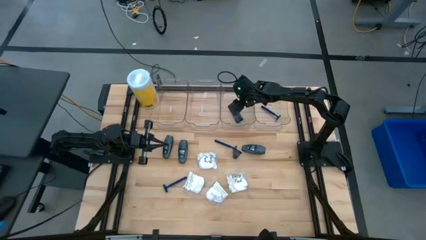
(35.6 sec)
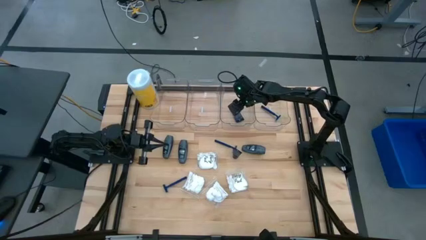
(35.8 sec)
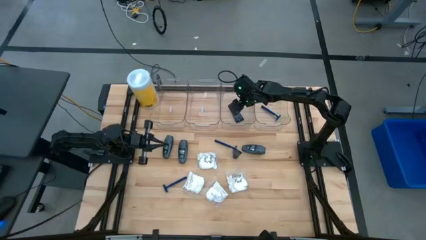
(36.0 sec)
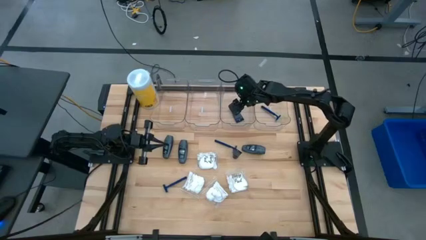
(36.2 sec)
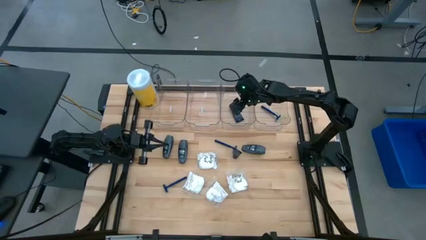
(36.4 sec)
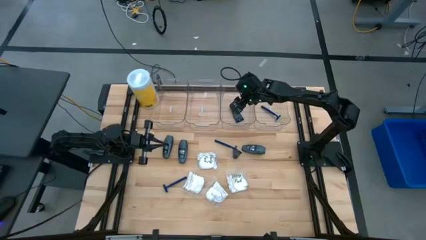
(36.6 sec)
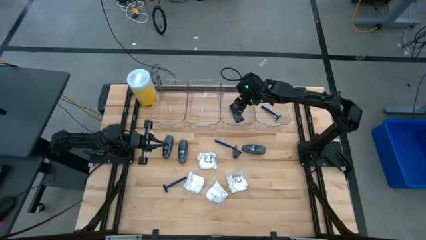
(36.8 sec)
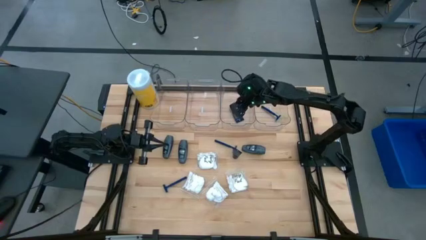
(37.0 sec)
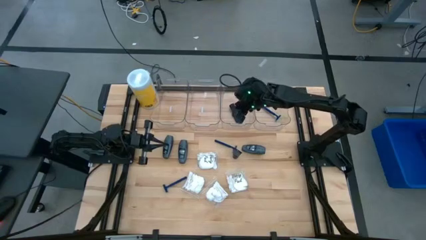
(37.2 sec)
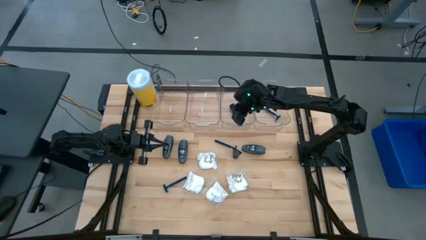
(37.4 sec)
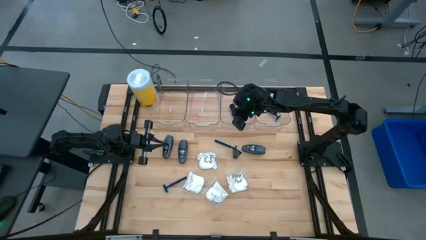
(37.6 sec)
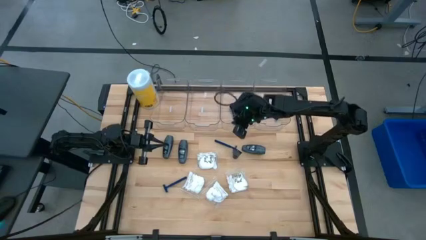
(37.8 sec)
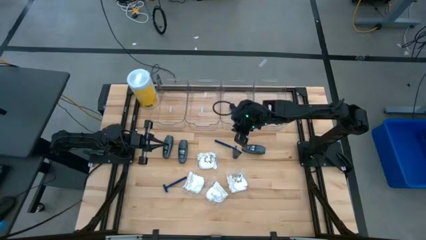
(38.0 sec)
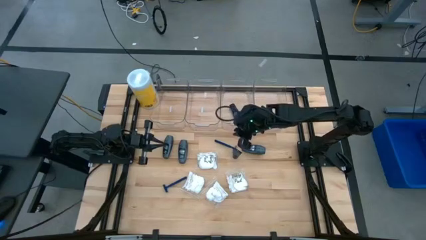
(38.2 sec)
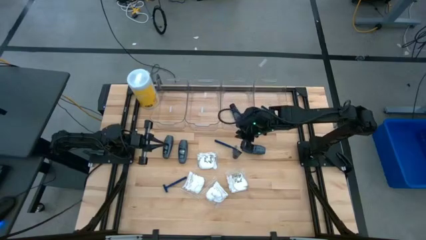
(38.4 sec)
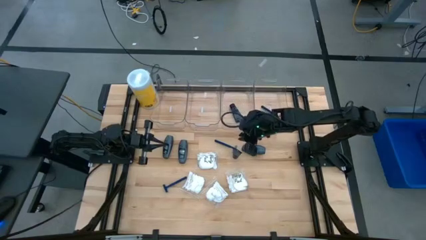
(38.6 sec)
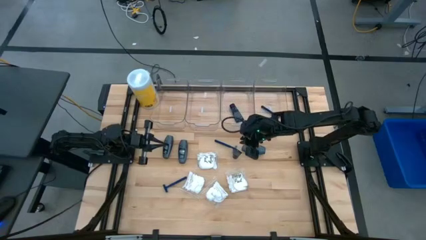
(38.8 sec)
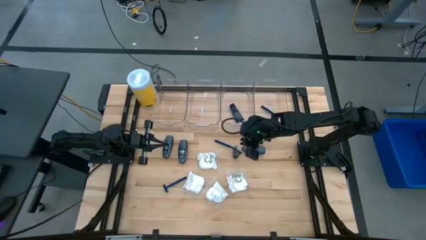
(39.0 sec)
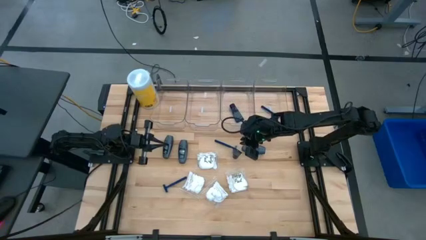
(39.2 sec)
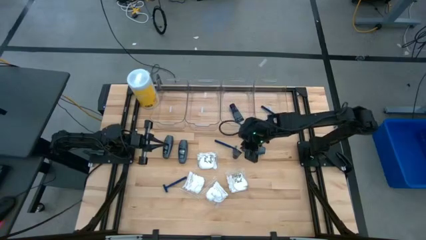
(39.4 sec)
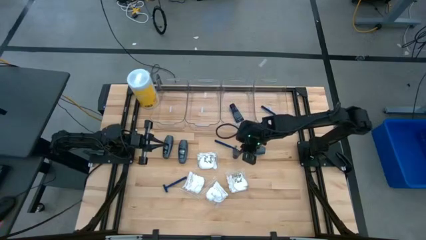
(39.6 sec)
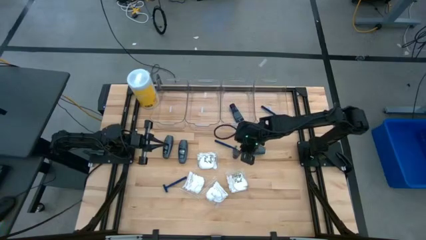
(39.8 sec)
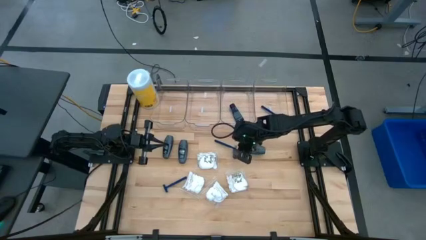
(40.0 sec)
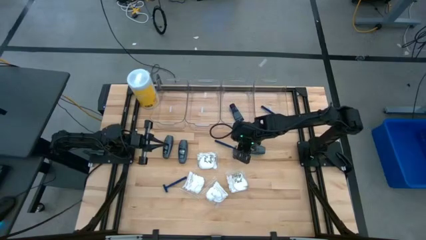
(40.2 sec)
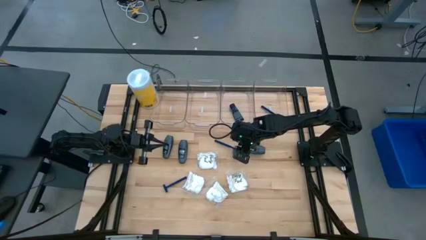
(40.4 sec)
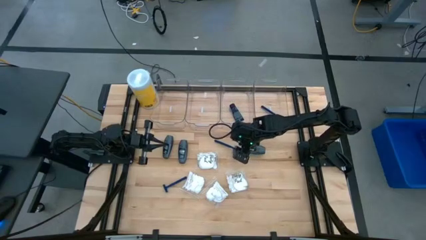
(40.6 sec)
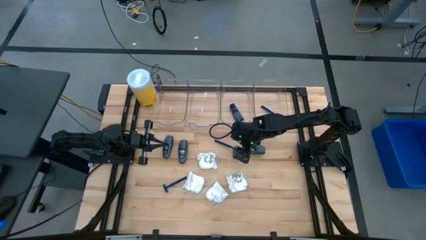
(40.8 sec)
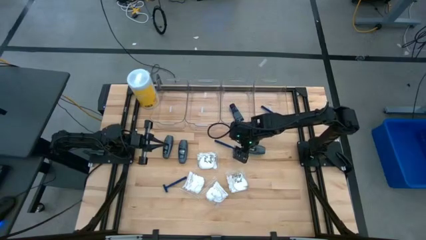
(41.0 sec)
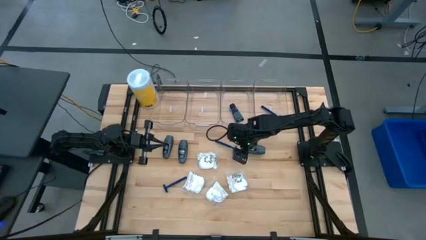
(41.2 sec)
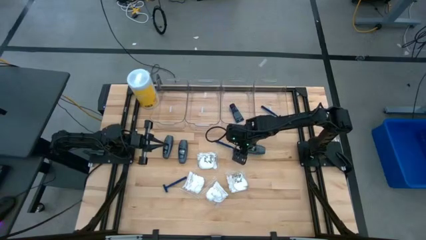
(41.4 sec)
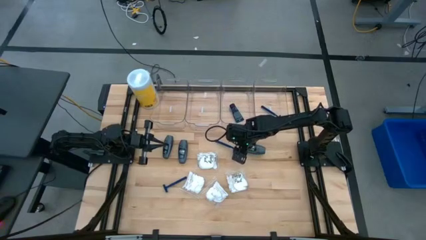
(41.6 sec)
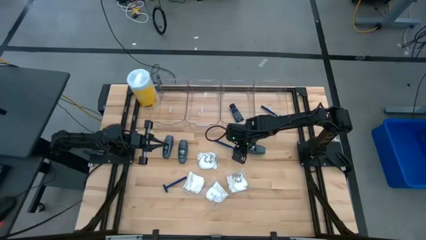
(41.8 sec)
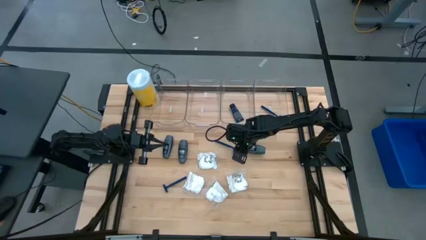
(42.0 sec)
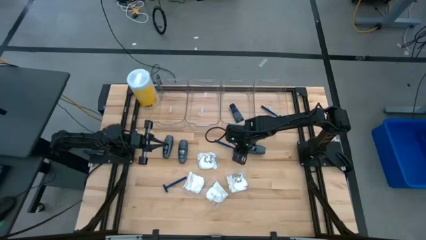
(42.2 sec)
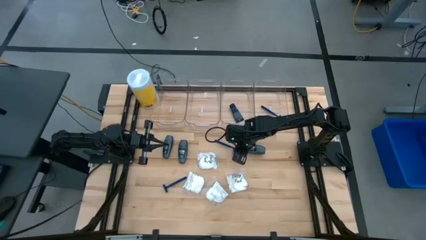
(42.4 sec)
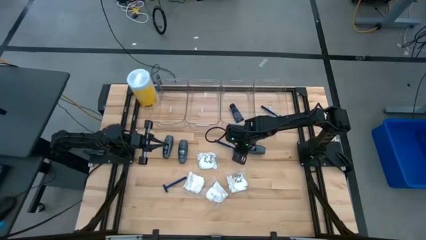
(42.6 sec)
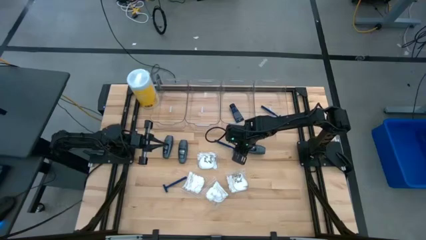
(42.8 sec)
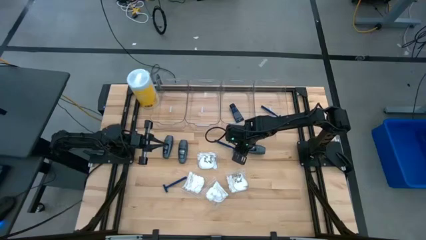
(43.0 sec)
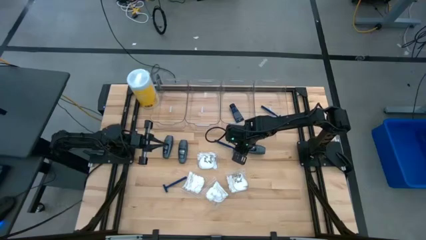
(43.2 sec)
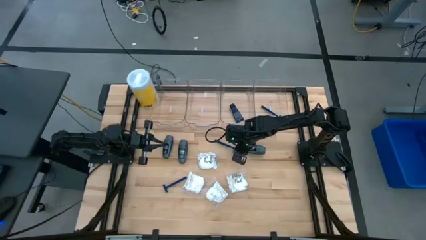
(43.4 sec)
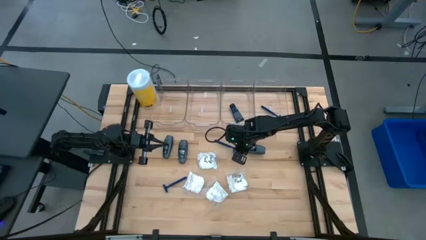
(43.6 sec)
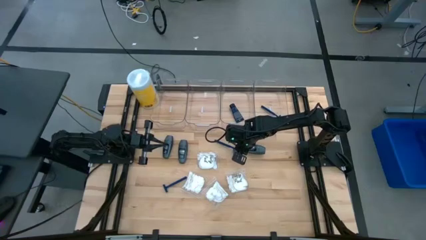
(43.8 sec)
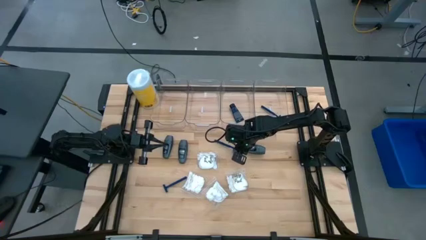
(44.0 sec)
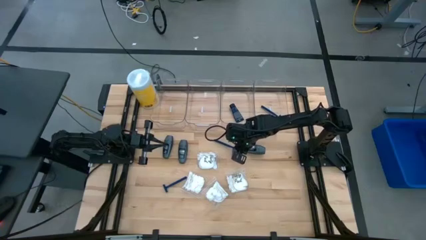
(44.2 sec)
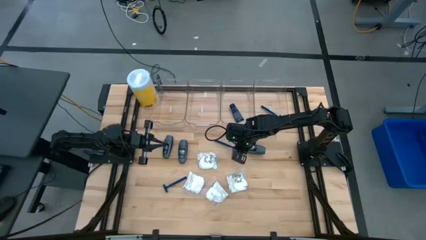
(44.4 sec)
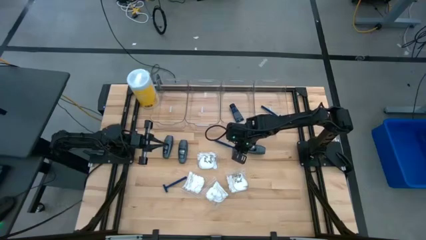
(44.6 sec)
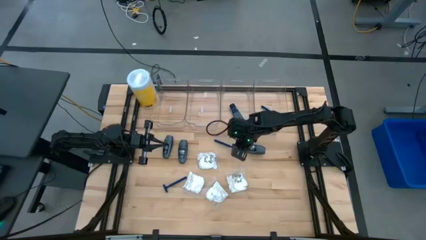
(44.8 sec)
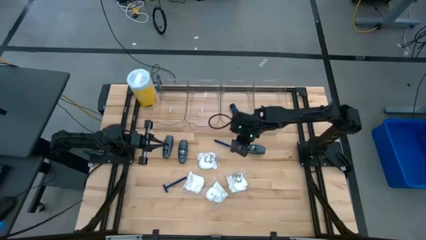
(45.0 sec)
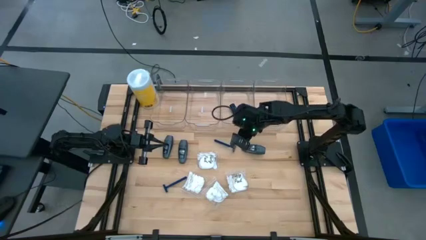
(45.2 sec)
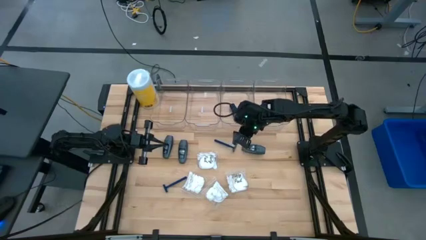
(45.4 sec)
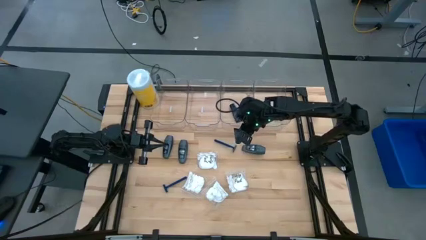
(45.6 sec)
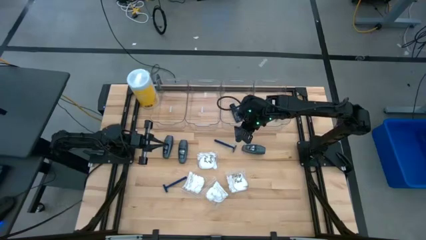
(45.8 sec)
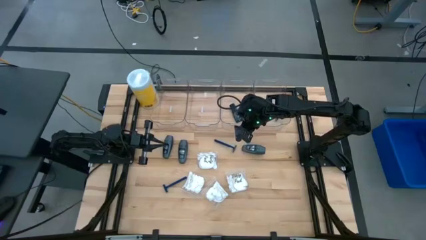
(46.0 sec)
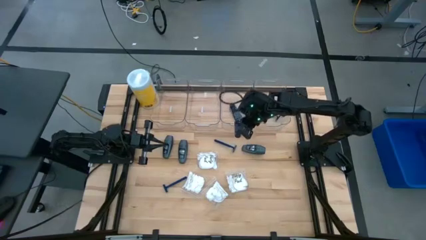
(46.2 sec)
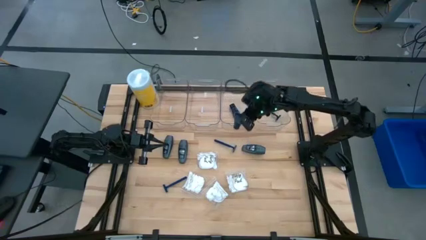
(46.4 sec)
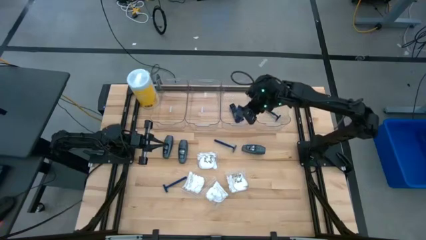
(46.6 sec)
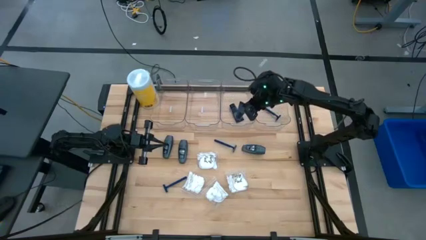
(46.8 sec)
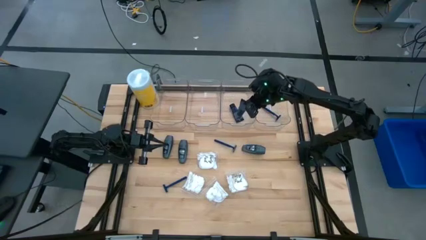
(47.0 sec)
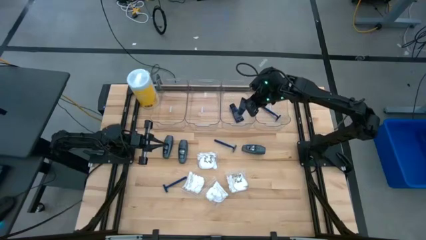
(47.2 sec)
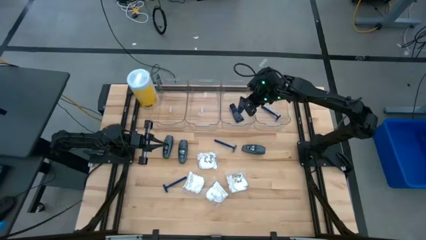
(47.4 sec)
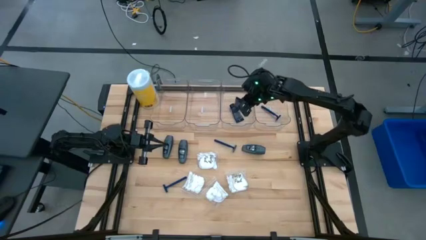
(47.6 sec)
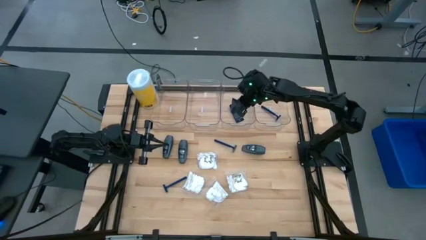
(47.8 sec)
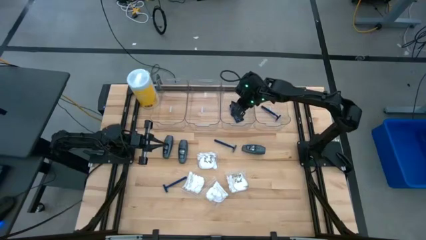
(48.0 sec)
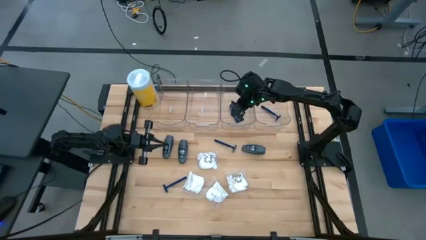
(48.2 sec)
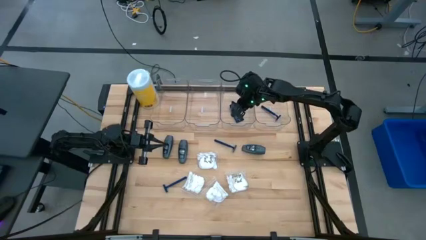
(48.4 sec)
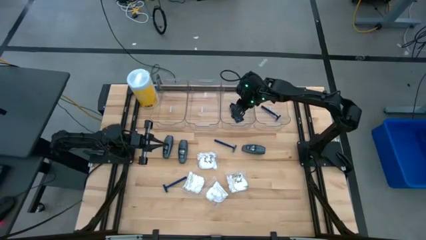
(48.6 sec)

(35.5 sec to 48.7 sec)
Task: Pick & Place Travel size toiletries
Put the dark blue shave cream into the middle right transparent bin
